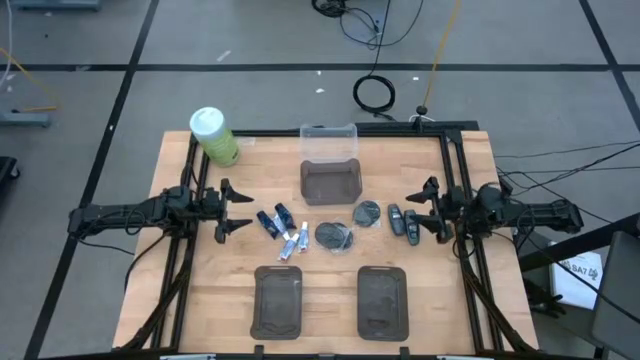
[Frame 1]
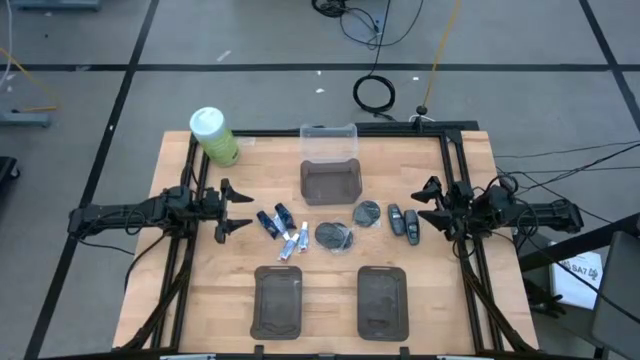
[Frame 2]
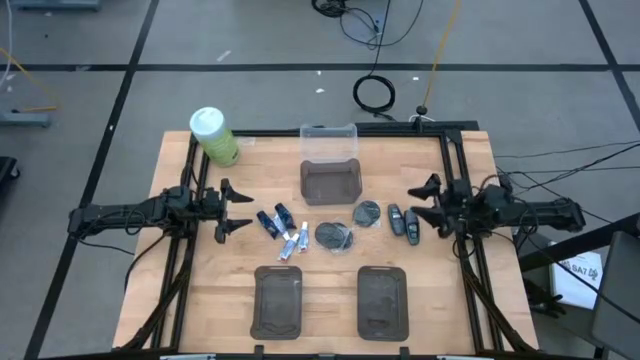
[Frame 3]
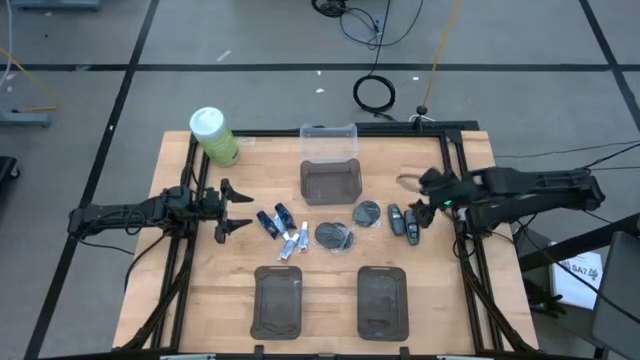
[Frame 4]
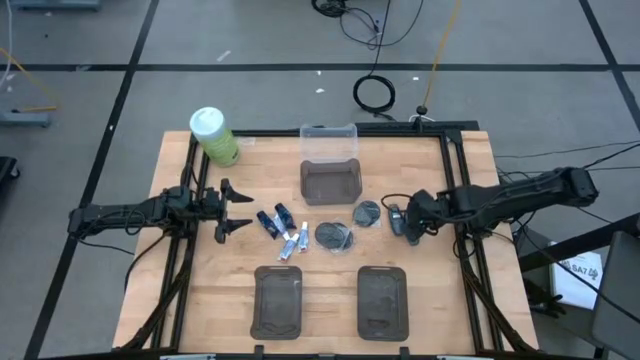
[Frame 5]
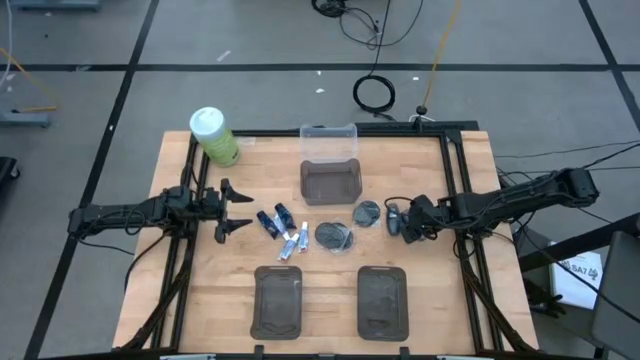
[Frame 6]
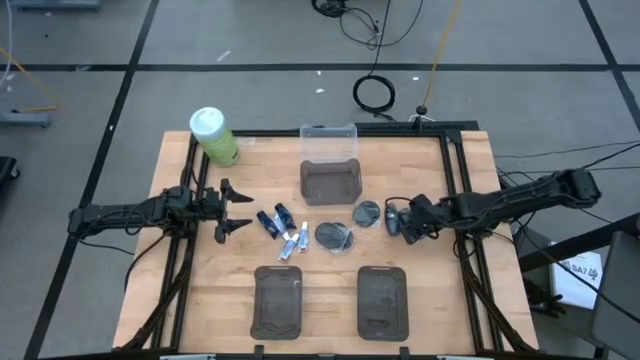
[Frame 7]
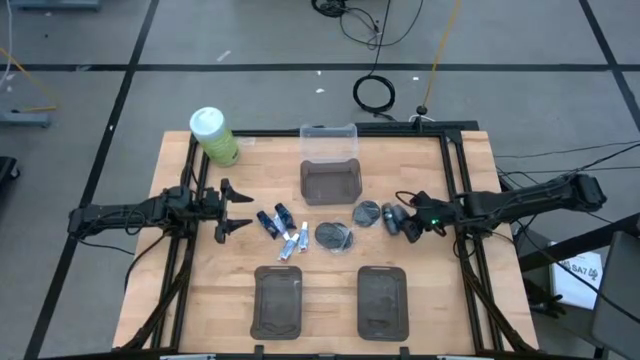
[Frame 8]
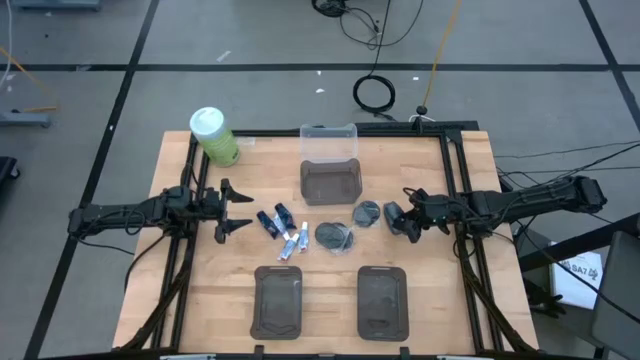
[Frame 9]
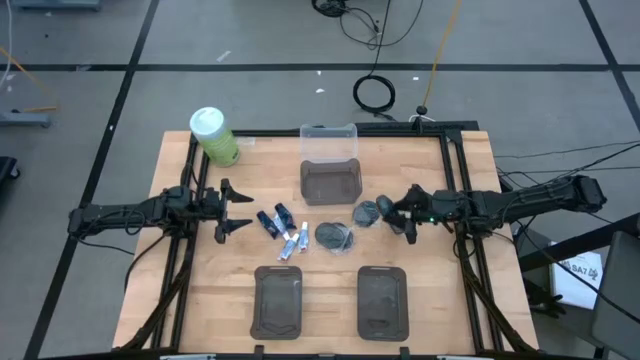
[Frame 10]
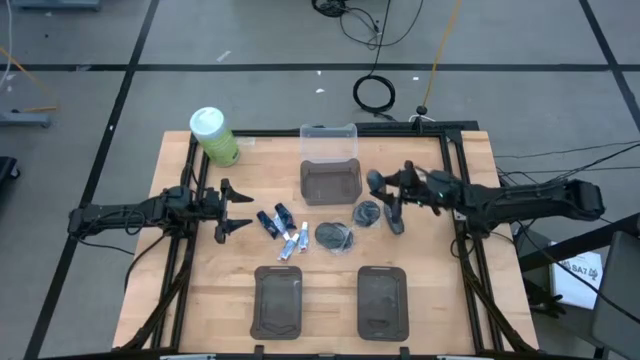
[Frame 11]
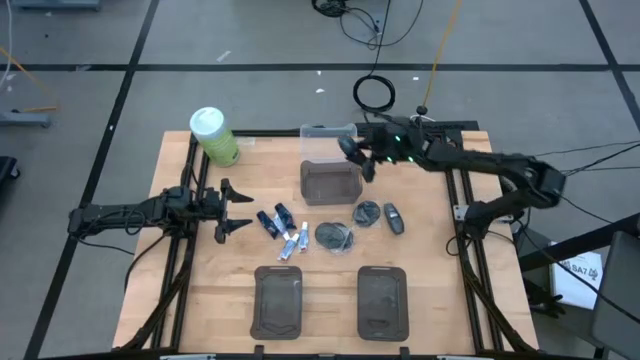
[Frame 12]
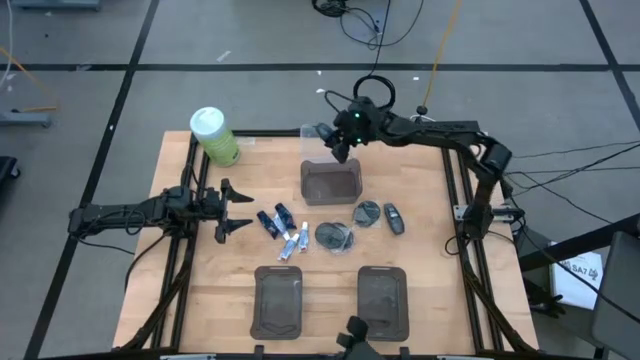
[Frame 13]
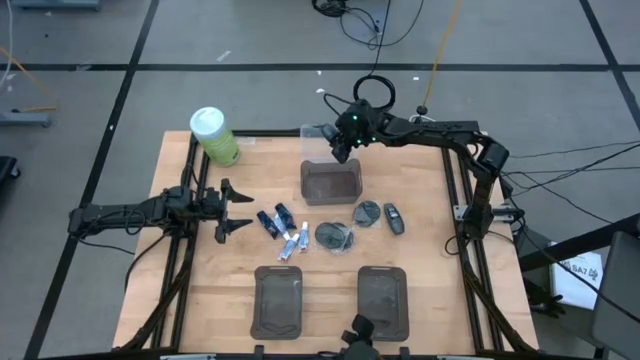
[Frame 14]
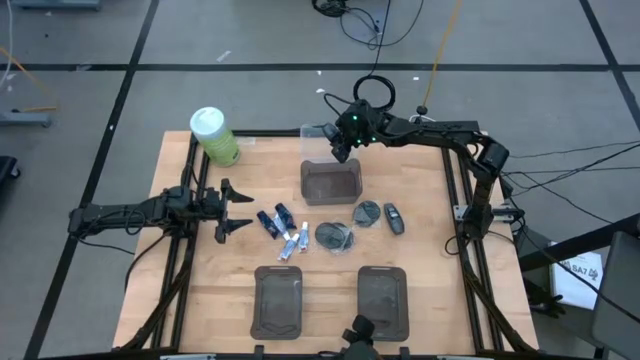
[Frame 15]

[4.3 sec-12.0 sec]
Task: Pick & Place Travel size toiletries
Put the right black deodorant into the transparent bin

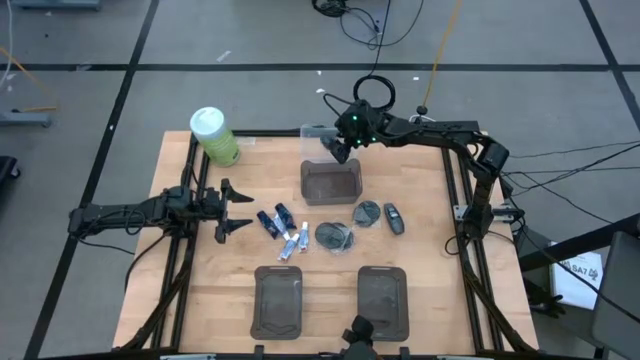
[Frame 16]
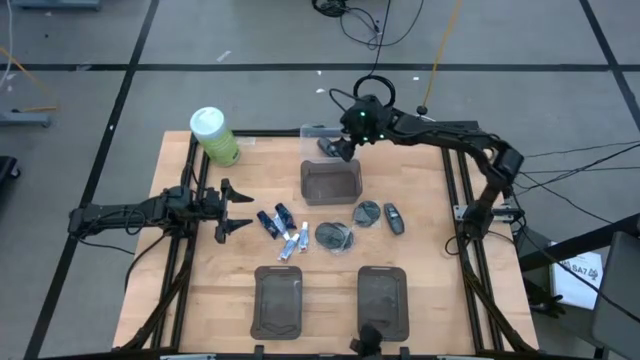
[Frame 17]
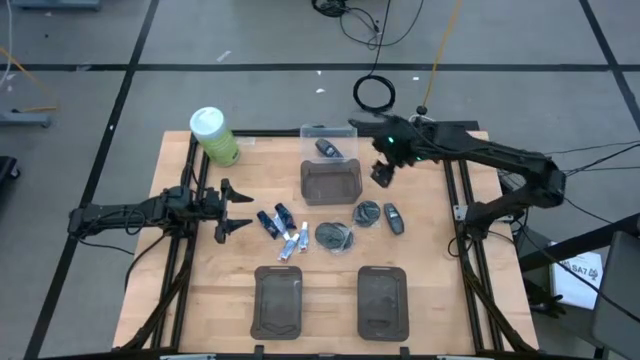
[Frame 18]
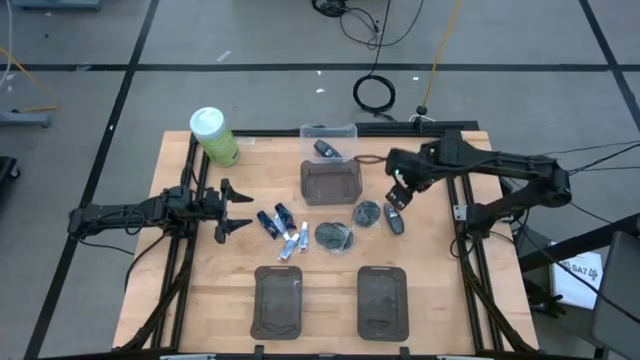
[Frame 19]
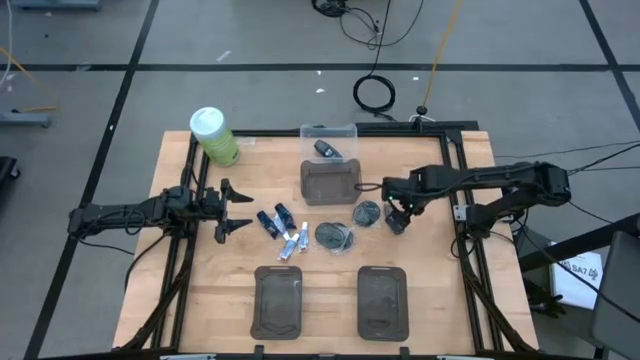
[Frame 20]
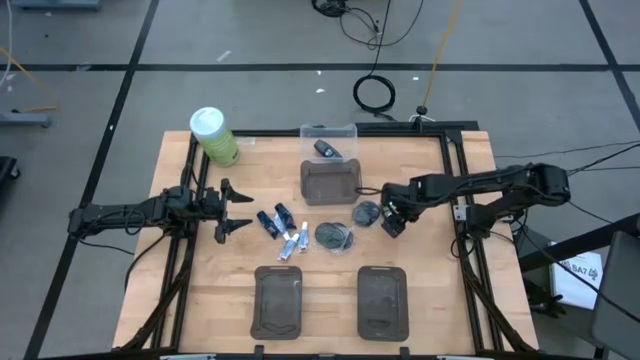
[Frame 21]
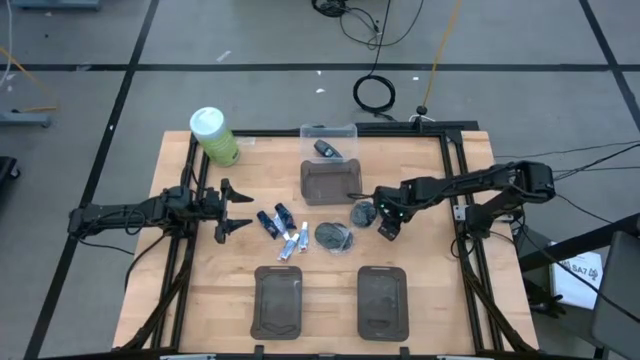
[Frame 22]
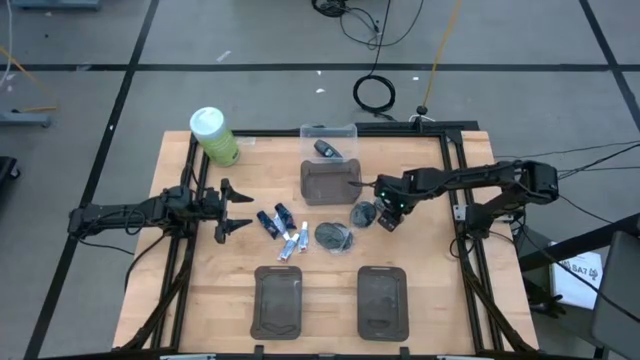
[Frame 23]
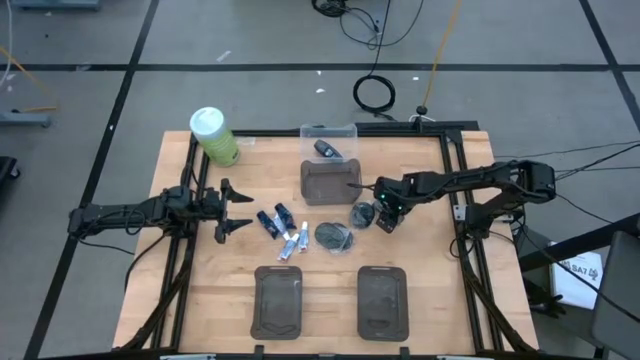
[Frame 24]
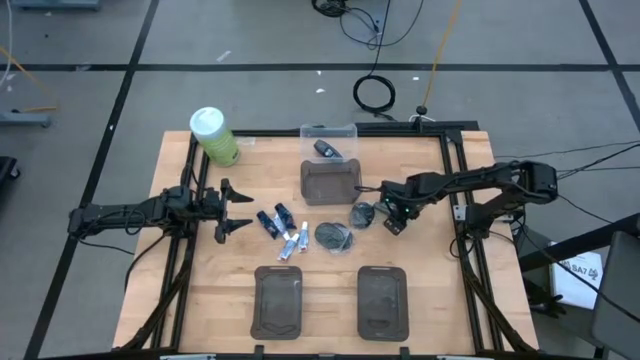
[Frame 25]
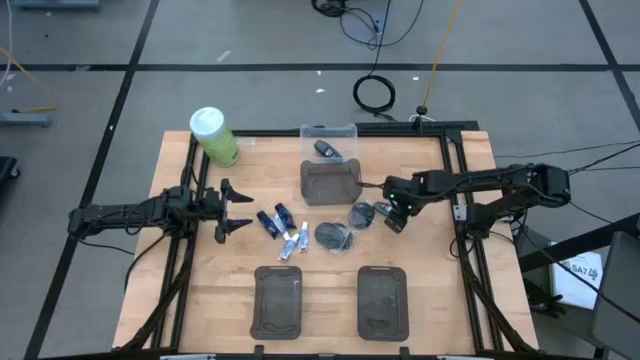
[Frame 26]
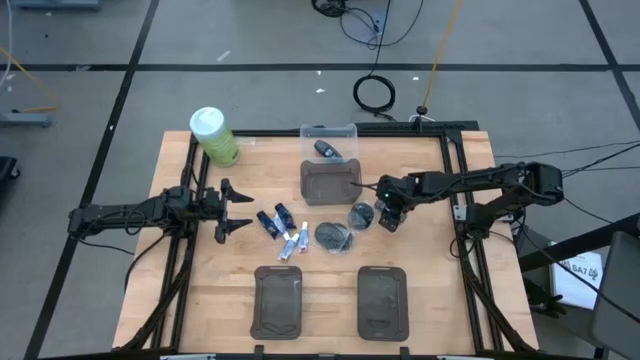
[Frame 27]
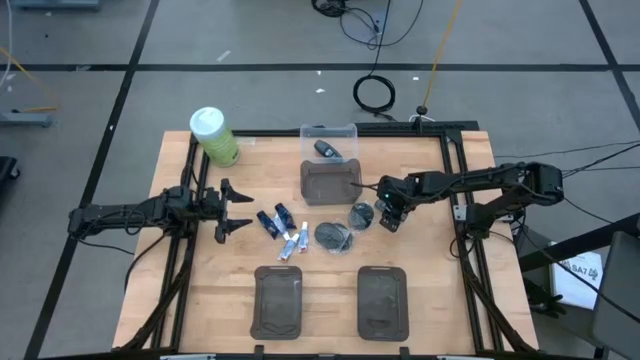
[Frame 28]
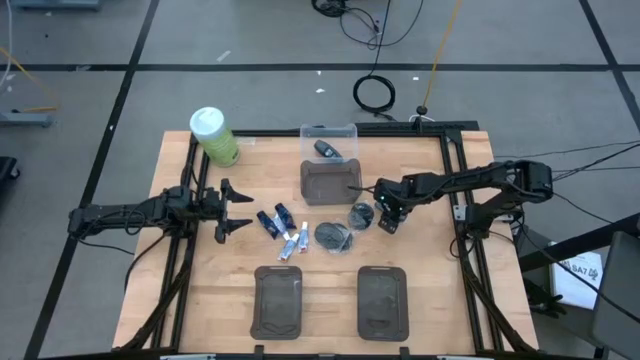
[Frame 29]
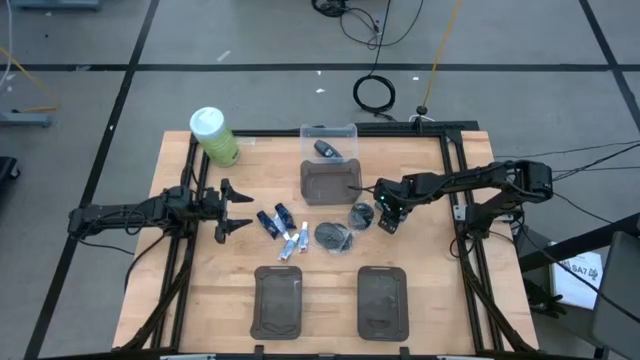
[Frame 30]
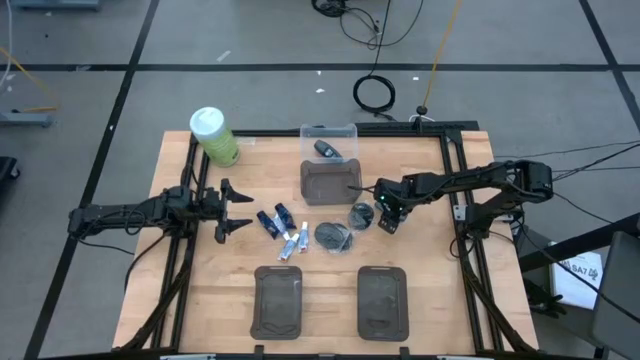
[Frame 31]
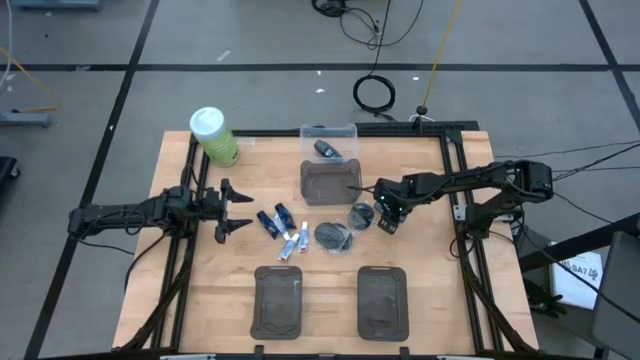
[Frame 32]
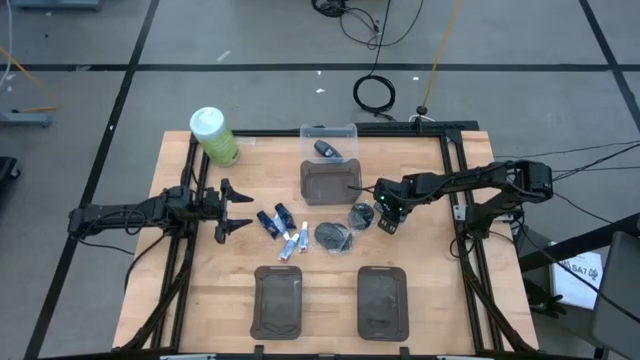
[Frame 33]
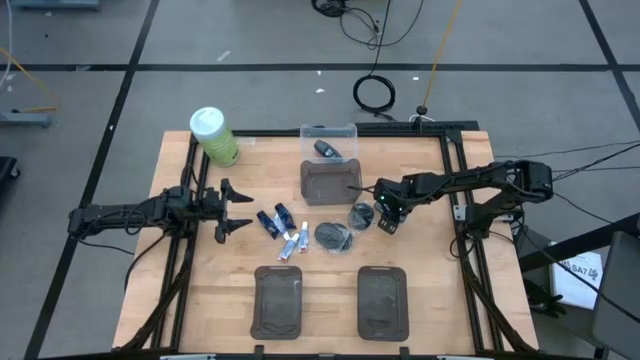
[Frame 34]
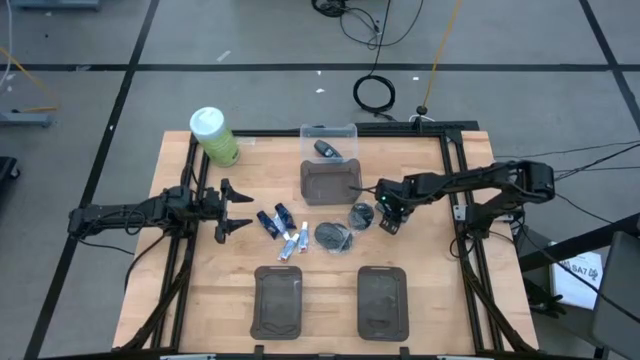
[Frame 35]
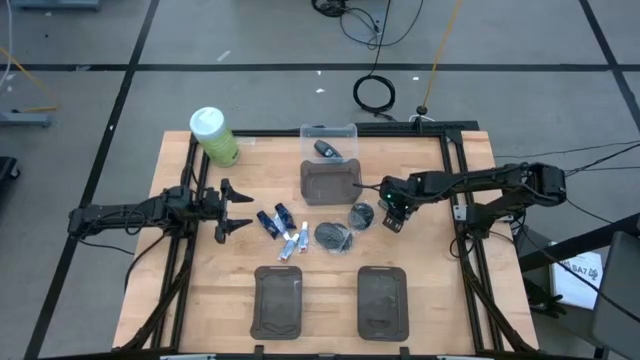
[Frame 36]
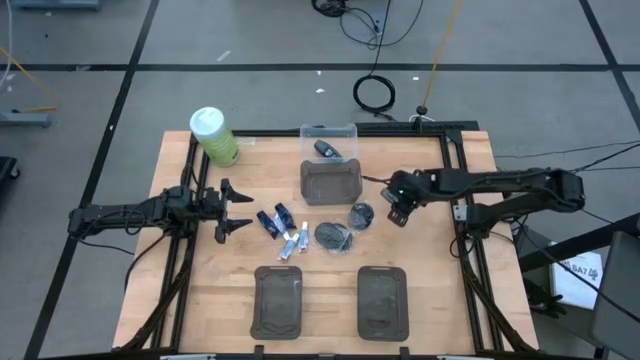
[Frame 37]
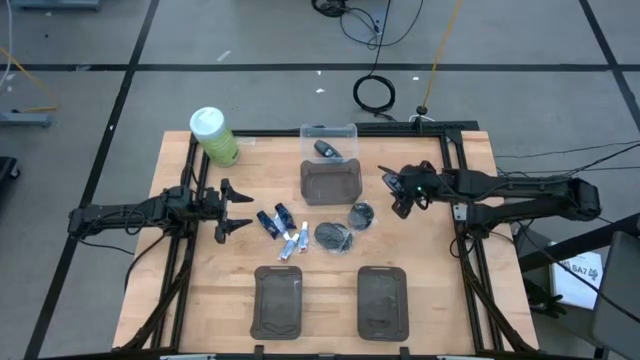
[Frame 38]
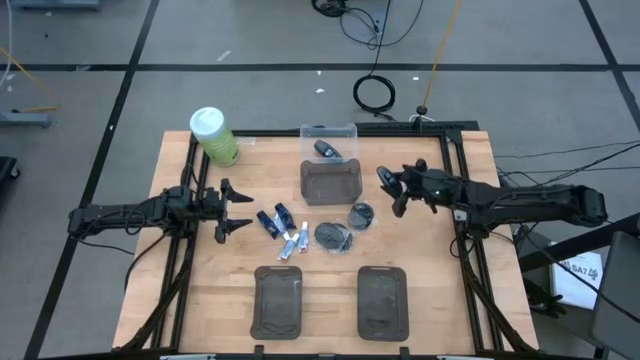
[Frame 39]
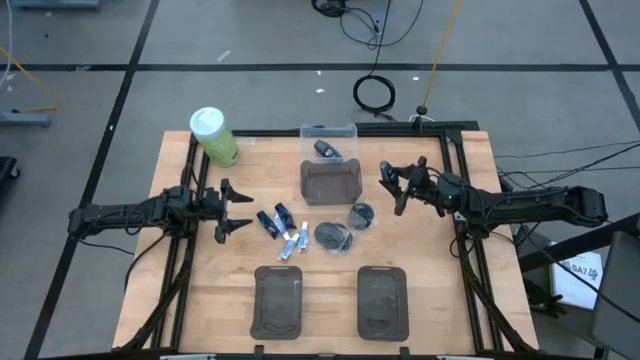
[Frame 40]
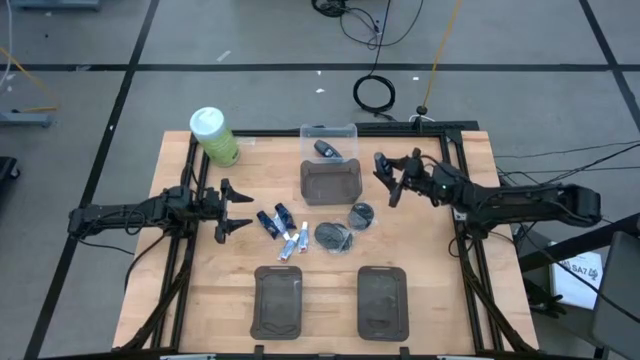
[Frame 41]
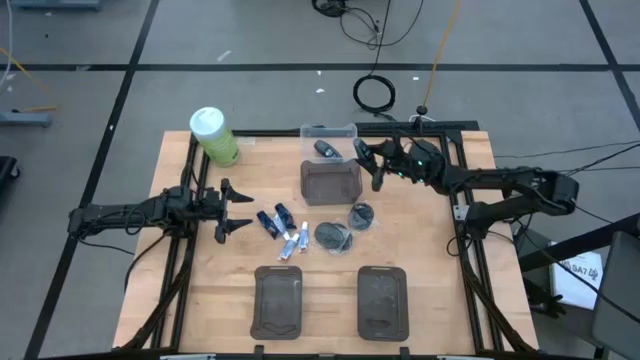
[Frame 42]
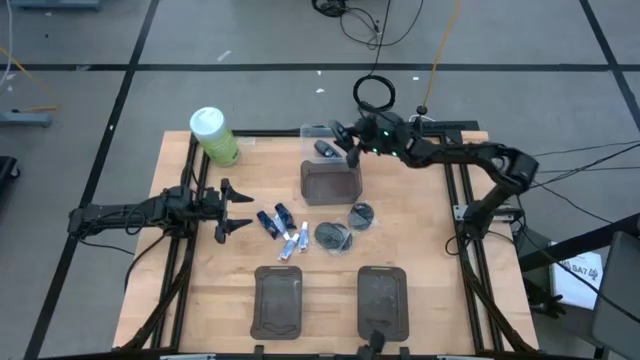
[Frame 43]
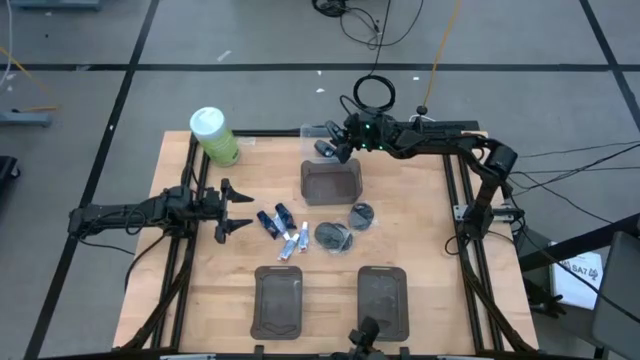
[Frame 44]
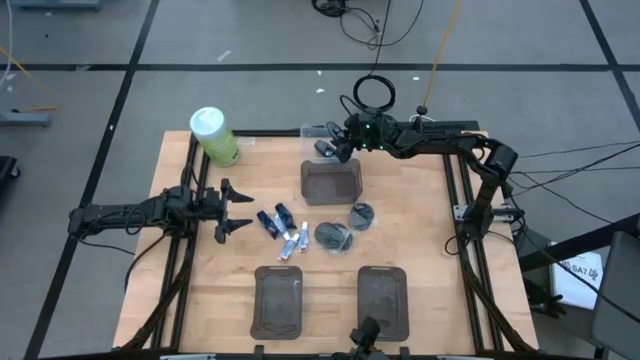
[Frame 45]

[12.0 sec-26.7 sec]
Put the black deodorant into the transparent bin
